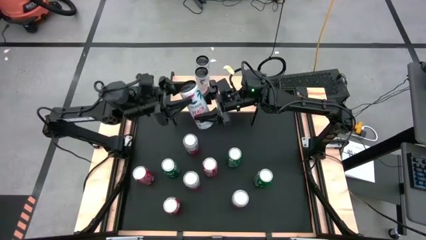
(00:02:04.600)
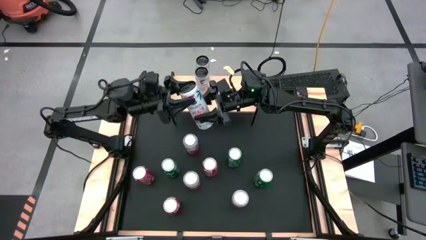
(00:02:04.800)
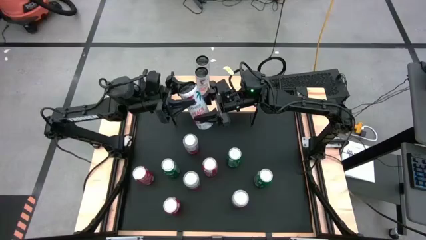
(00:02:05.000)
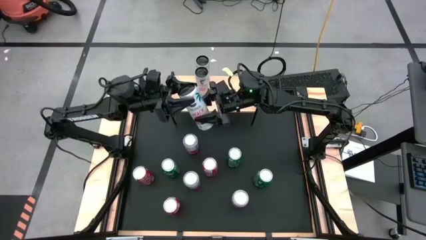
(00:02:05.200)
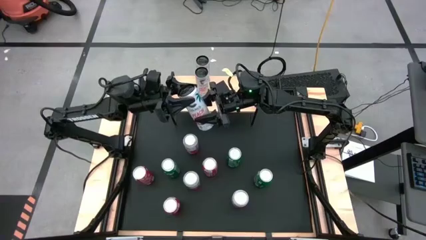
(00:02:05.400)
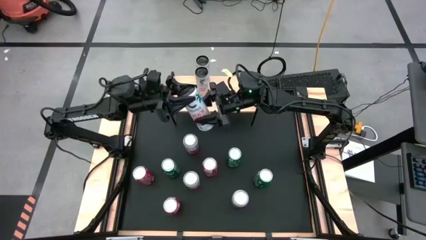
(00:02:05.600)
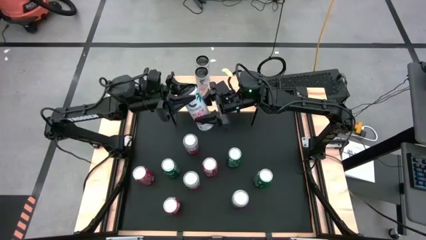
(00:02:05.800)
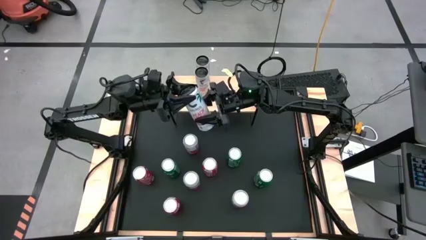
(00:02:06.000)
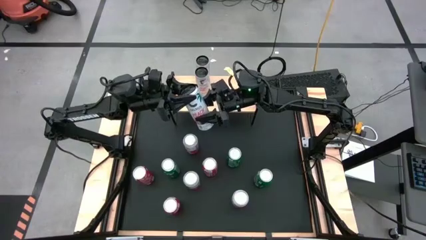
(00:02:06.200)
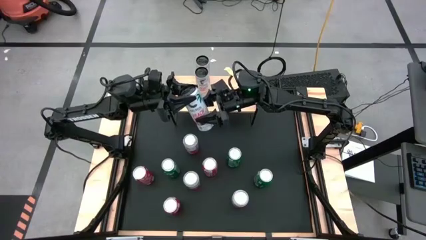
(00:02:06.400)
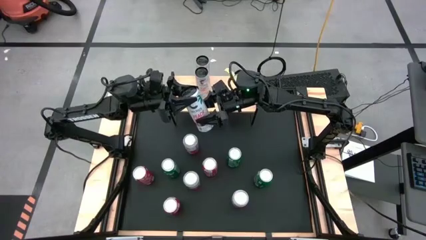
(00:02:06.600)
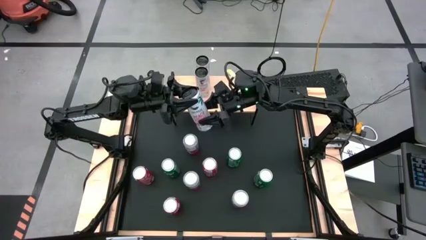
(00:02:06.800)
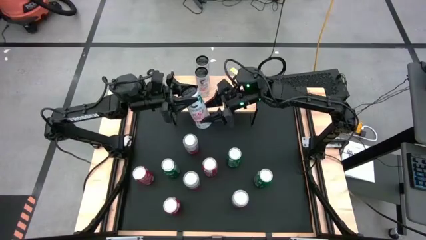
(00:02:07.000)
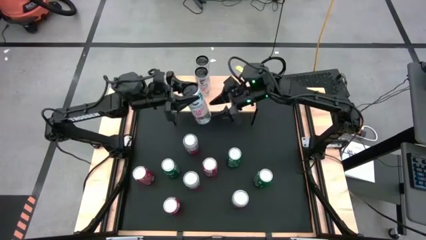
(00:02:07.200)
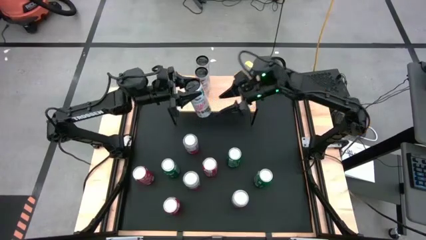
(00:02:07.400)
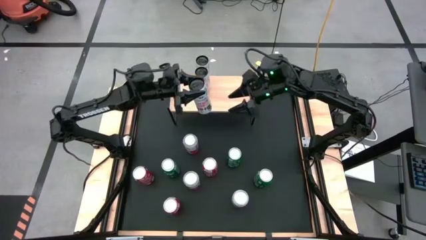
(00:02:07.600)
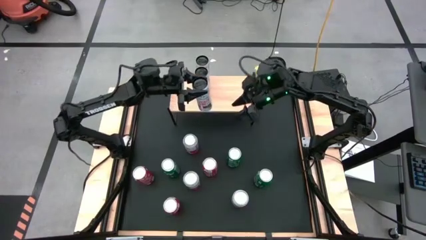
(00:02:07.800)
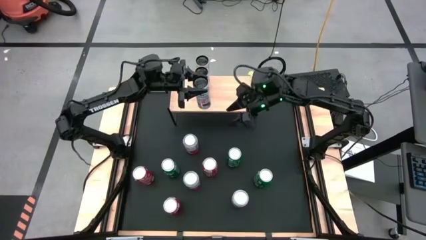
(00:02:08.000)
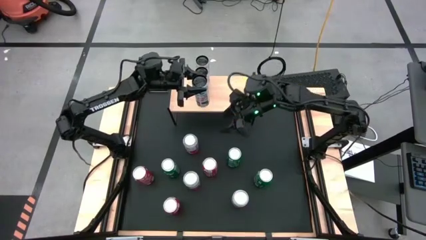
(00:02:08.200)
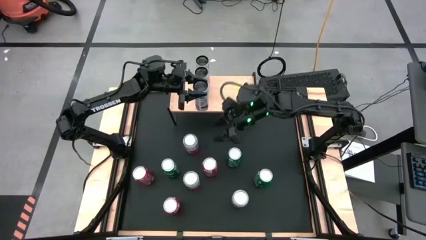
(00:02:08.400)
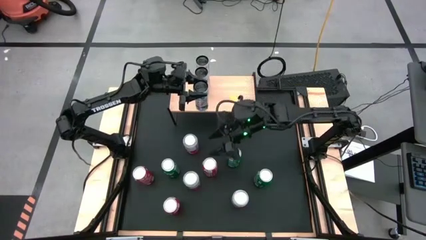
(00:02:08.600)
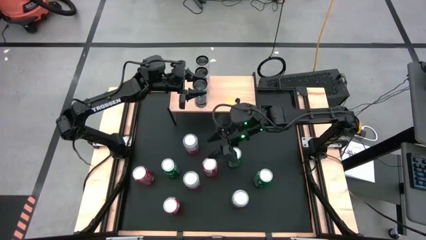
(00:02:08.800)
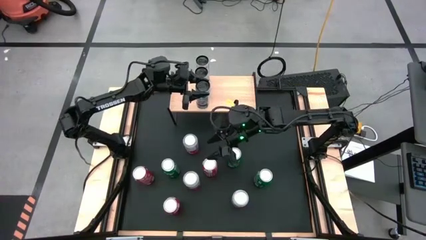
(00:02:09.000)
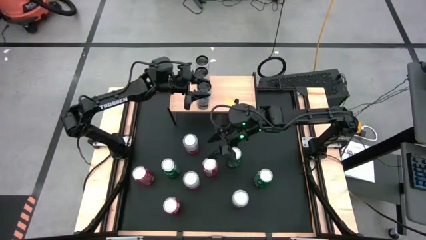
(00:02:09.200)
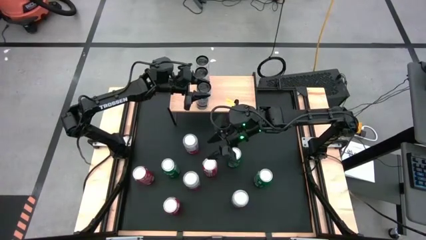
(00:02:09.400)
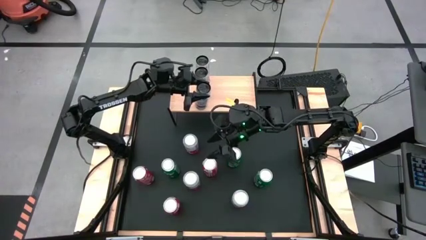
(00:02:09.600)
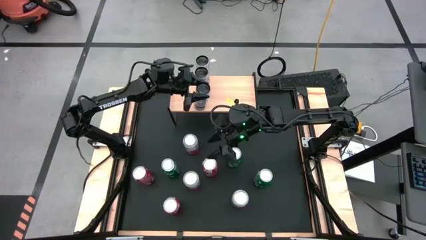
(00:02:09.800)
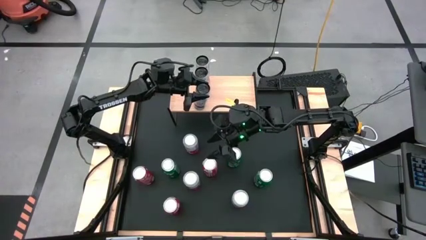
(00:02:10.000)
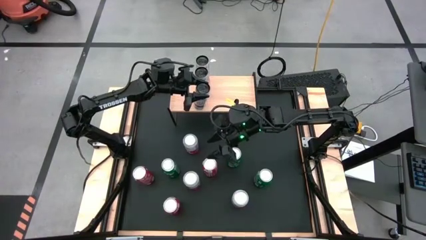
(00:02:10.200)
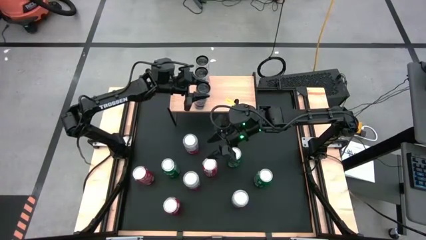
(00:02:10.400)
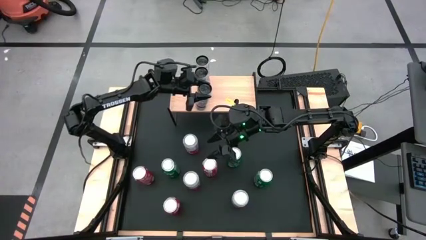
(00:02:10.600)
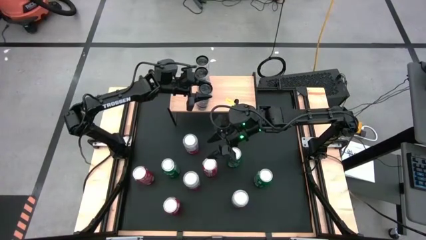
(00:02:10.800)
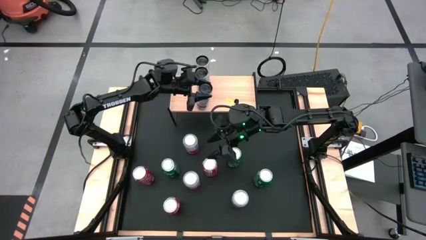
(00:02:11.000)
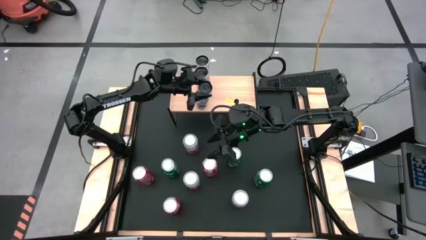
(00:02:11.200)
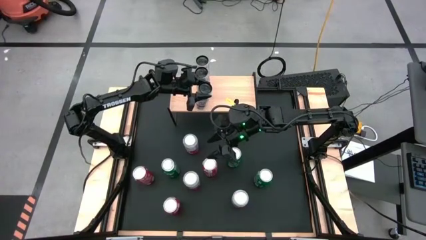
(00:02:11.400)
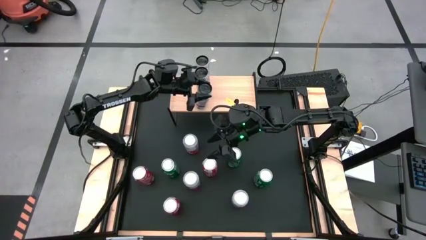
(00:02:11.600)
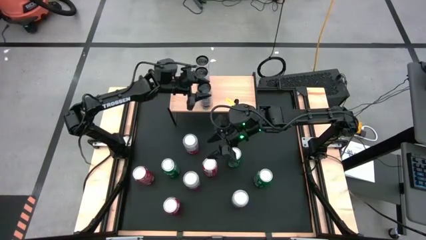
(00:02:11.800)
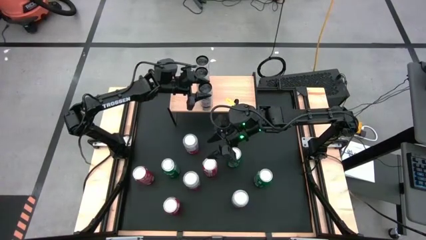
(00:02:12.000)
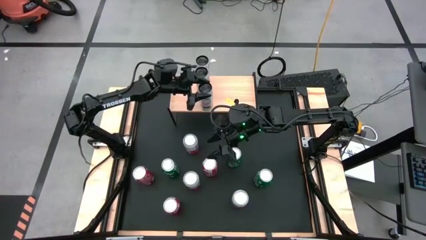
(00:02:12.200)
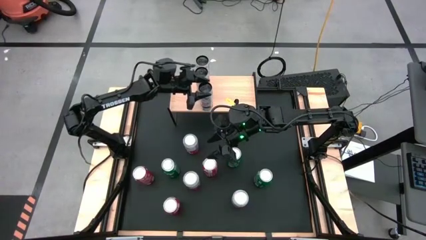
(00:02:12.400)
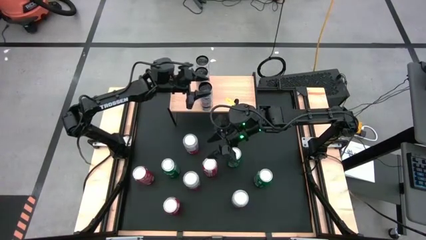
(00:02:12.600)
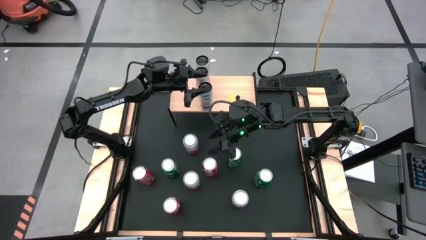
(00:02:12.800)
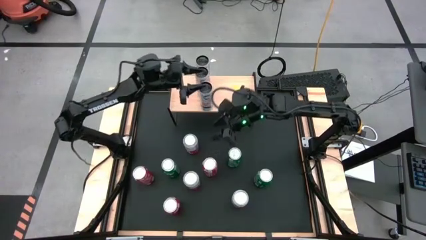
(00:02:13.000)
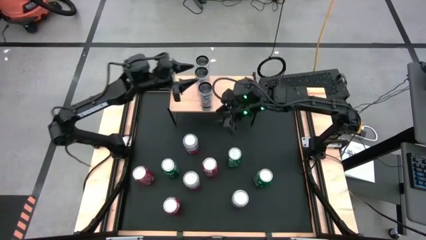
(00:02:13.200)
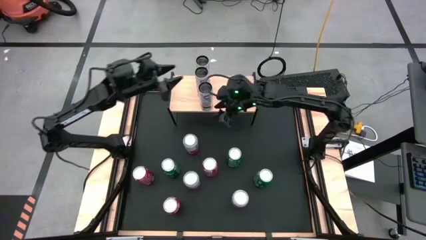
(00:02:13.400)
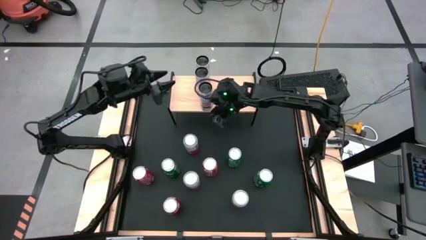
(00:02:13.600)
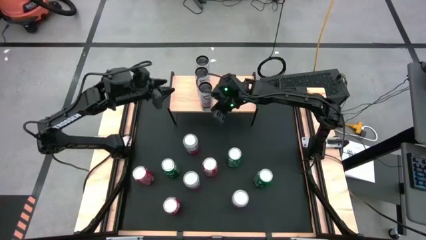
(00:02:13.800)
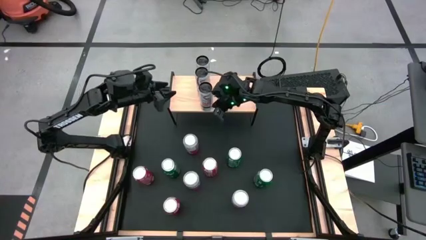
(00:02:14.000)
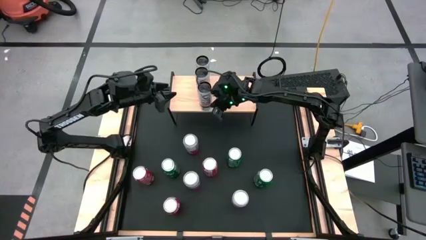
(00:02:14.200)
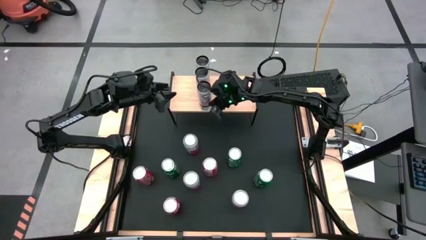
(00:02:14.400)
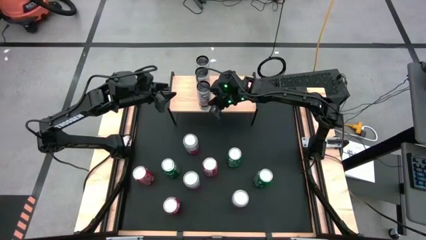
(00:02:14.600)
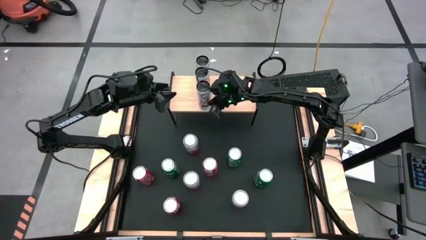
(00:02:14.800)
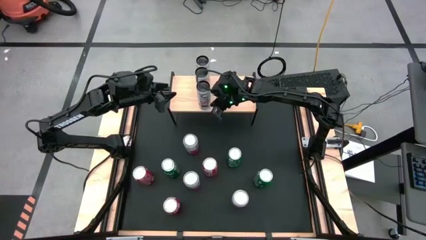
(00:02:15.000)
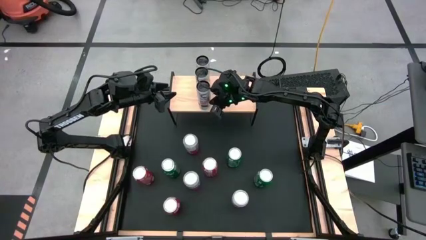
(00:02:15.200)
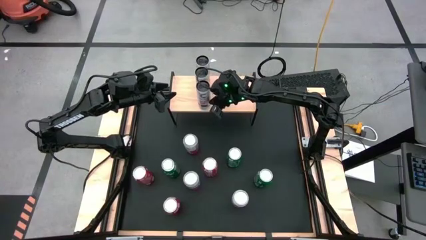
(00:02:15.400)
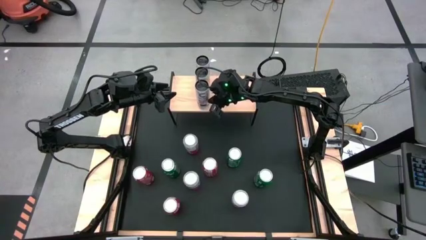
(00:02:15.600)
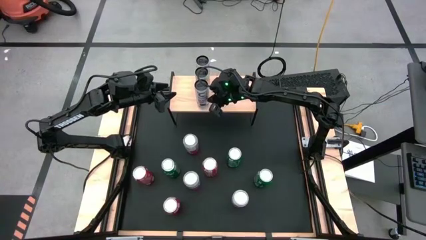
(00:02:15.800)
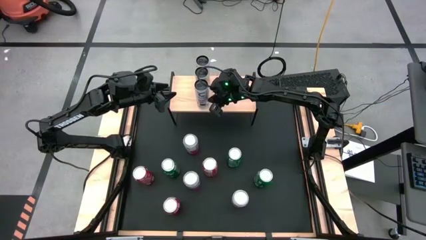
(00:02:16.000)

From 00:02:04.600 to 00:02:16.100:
Task: Place canned beverage on shelf
Put the white pink soda can aligned with the other white pink soda can on the shelf
